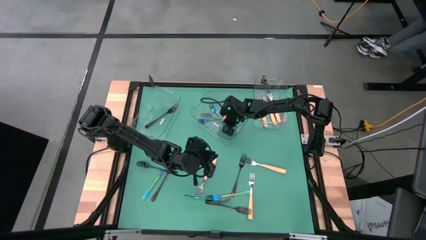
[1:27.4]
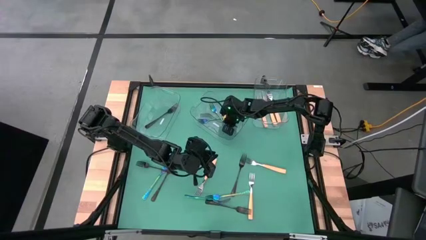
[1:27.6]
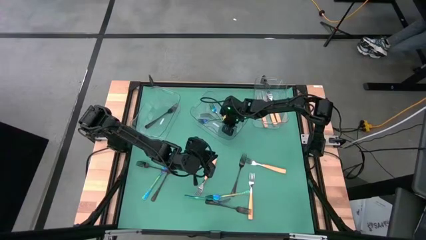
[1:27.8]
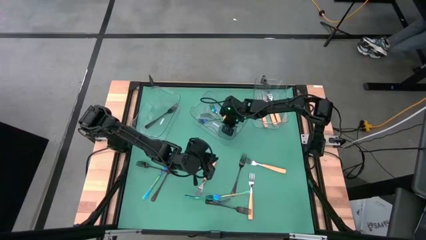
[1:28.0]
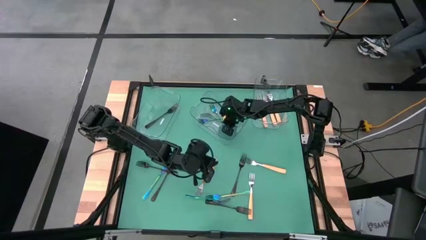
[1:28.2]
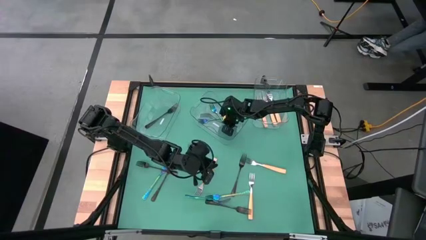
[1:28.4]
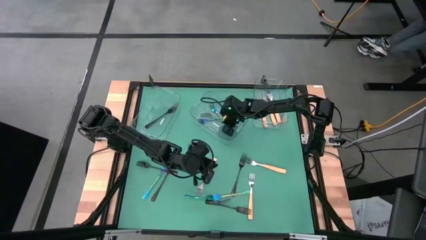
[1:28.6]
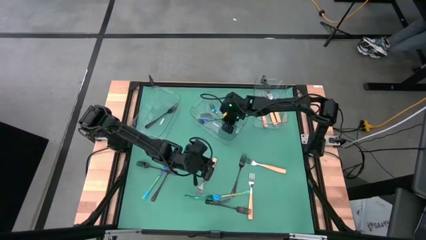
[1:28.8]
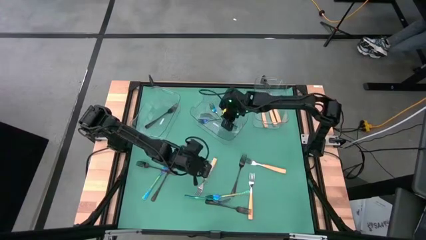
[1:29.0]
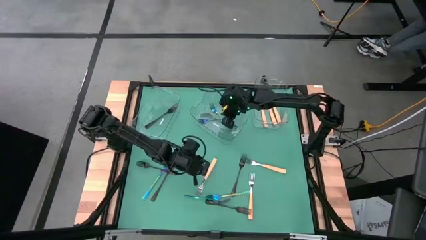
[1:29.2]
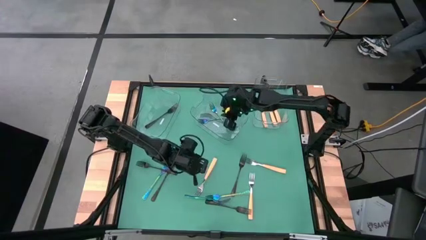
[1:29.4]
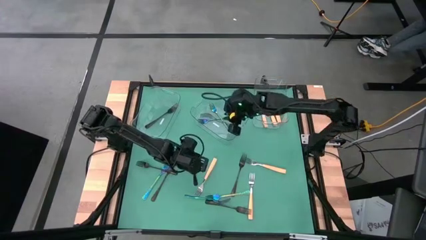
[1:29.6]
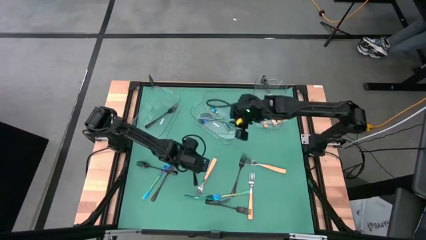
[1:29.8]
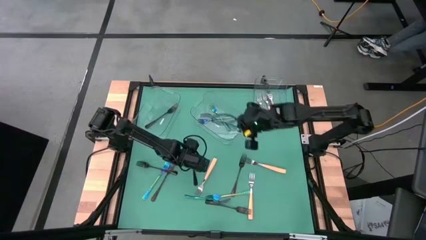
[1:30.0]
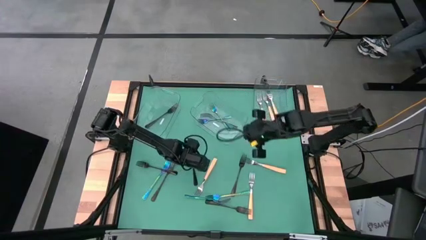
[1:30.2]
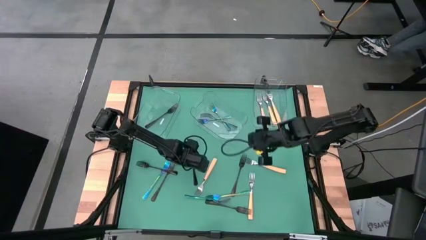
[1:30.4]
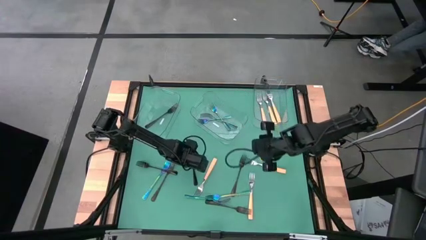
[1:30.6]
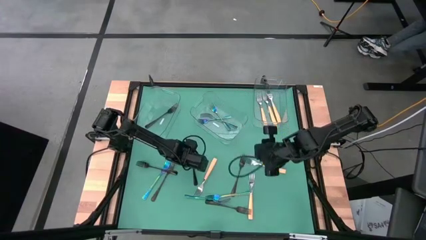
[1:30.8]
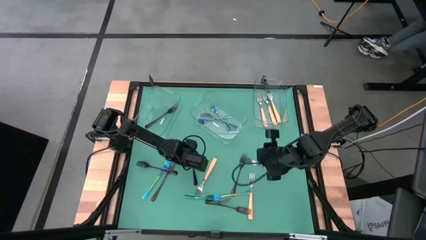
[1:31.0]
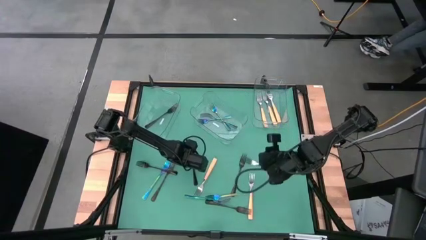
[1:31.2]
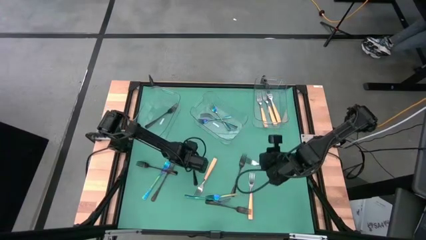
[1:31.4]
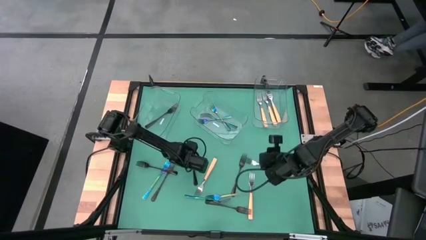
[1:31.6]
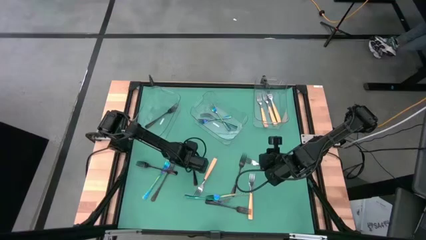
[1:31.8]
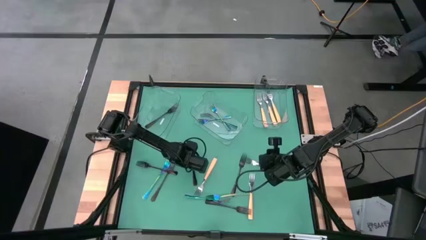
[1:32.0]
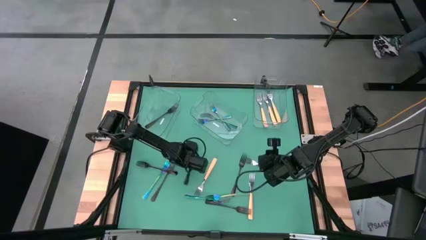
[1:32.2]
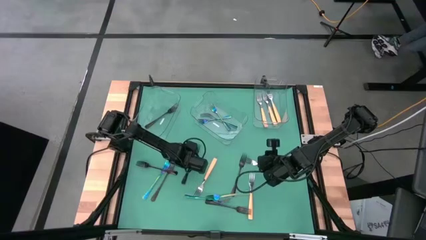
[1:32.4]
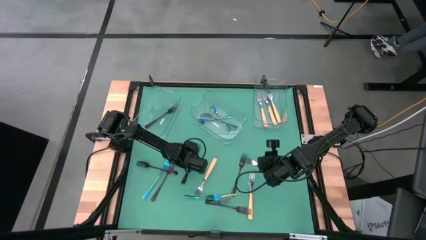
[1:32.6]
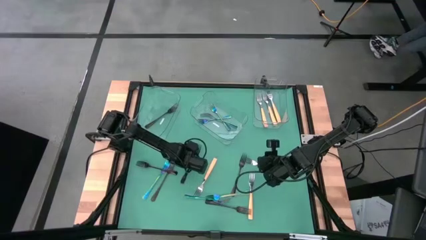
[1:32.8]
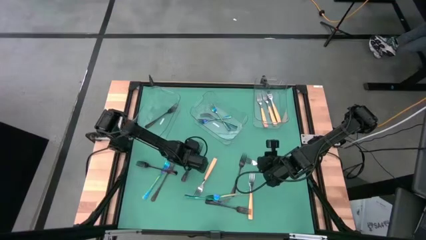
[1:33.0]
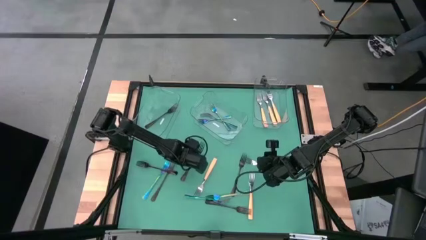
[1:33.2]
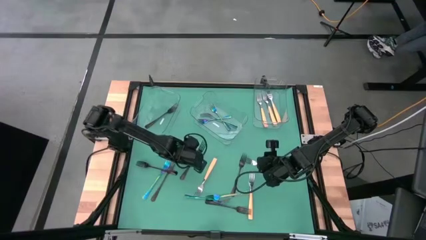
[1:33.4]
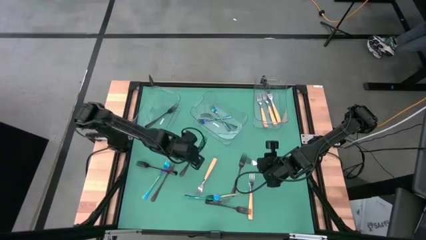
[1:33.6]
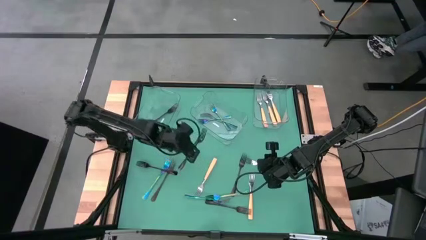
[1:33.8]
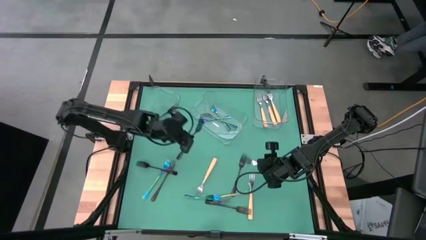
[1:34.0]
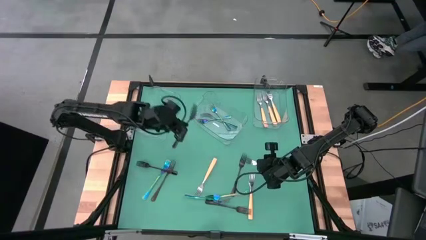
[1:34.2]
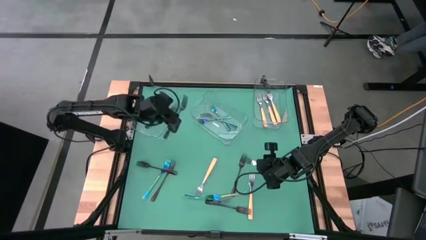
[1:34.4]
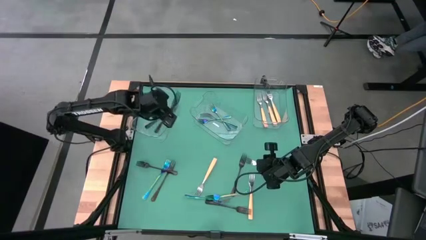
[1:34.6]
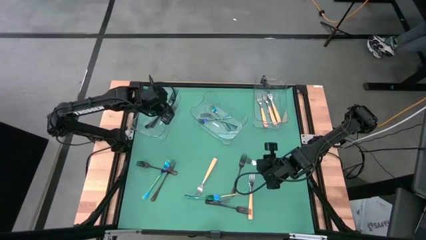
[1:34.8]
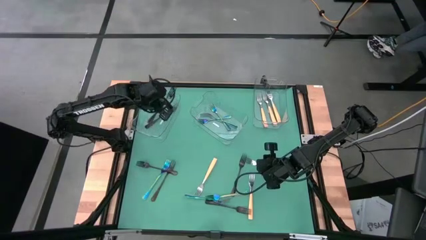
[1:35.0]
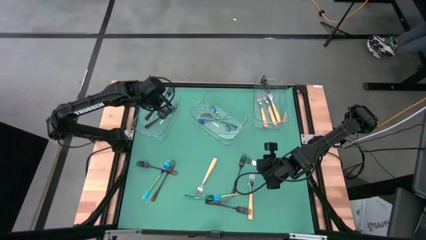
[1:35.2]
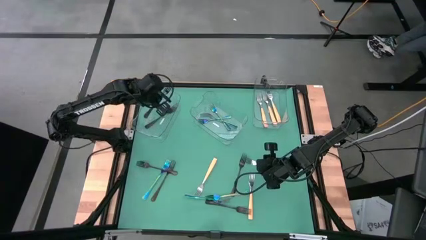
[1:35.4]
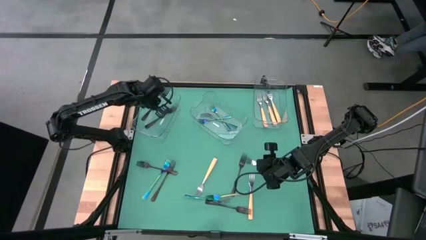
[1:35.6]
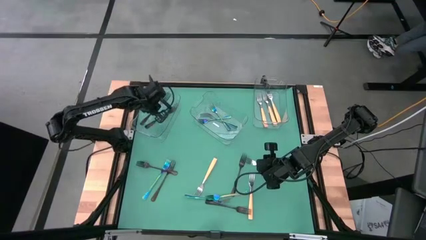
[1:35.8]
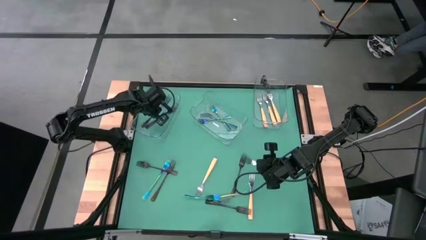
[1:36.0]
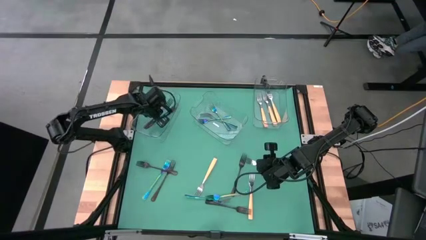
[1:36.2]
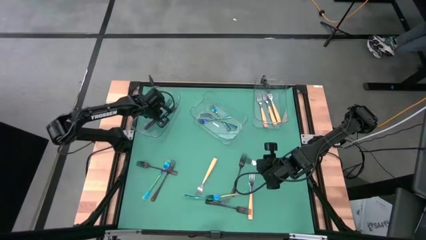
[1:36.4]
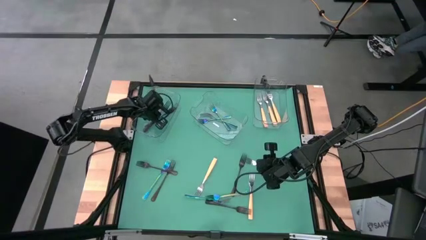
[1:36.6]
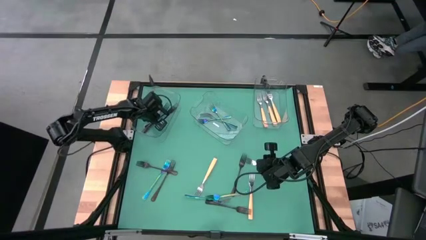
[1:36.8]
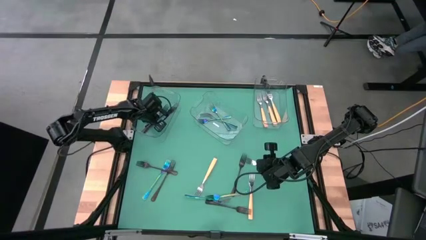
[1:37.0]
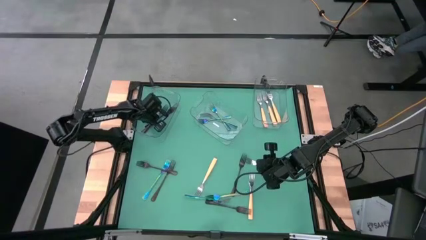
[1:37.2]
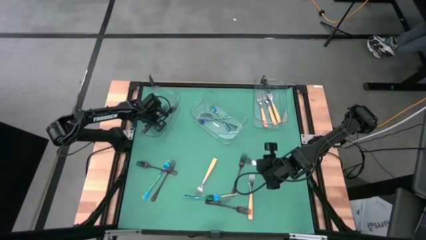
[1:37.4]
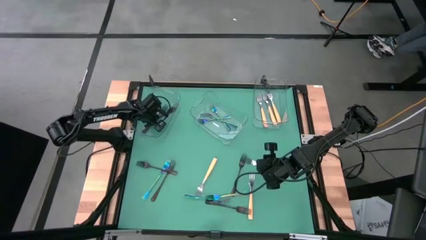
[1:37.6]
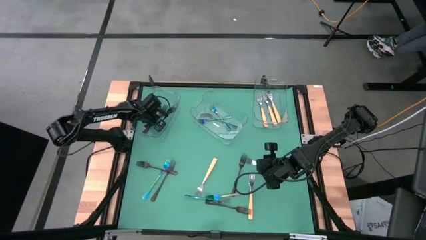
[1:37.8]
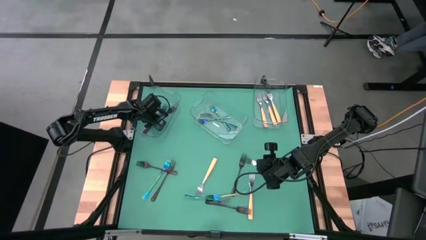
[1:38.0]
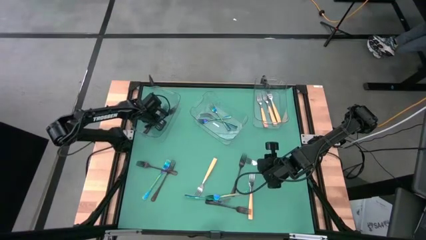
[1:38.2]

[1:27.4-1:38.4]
Task: Sort silverware by color (type)
Put the black fork into the left transparent bin

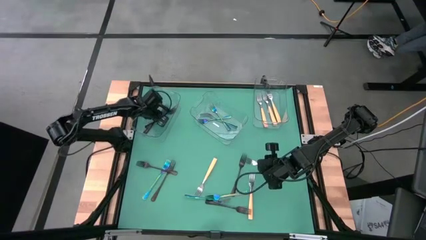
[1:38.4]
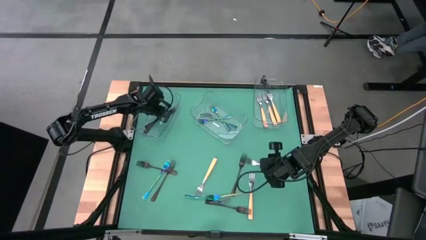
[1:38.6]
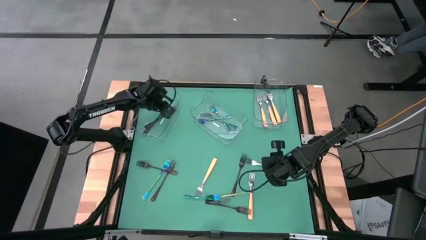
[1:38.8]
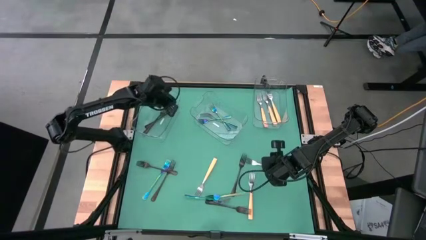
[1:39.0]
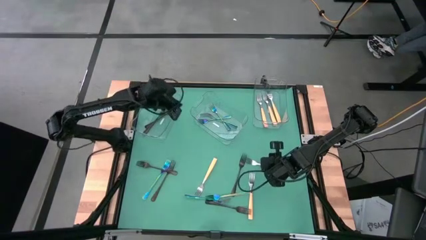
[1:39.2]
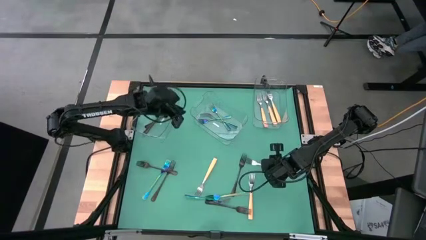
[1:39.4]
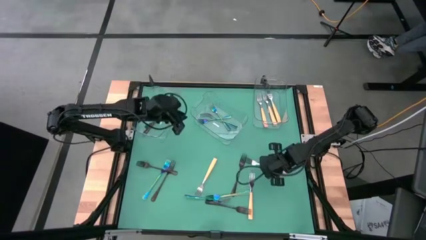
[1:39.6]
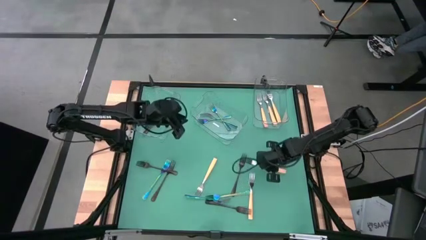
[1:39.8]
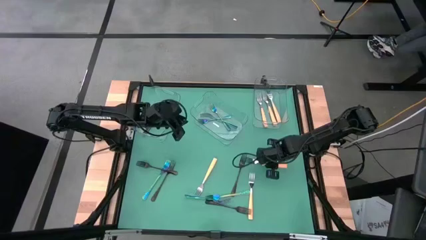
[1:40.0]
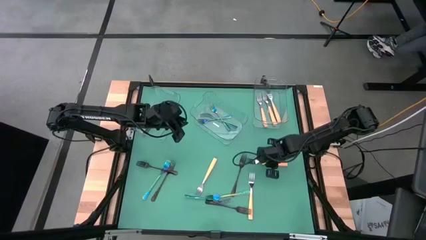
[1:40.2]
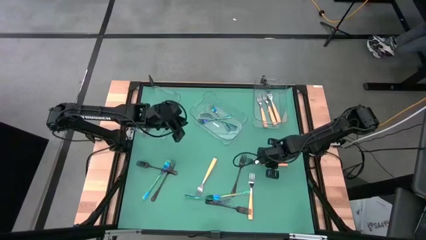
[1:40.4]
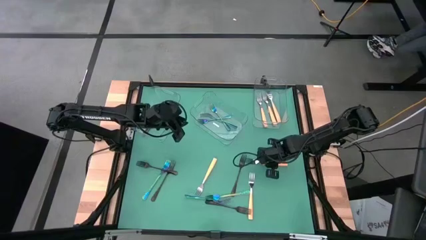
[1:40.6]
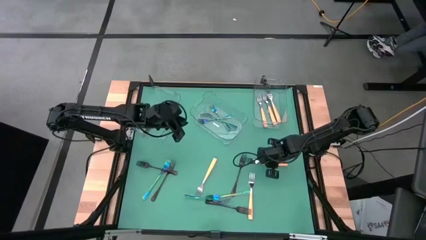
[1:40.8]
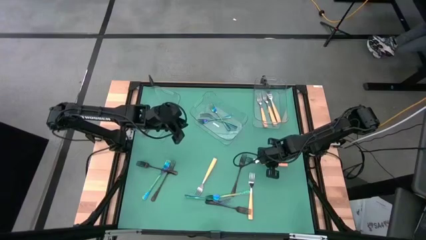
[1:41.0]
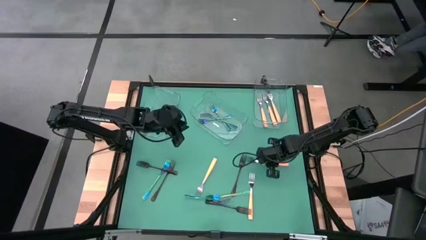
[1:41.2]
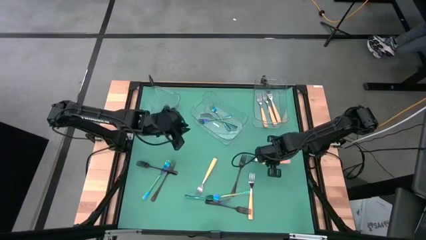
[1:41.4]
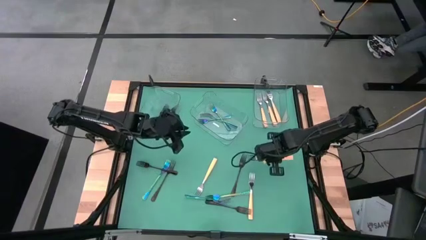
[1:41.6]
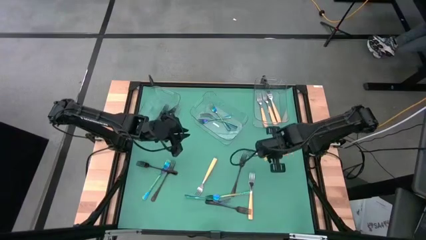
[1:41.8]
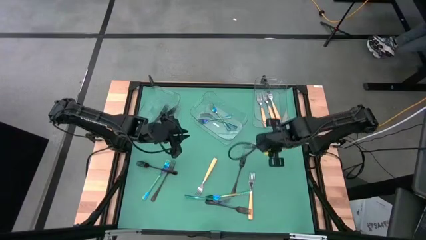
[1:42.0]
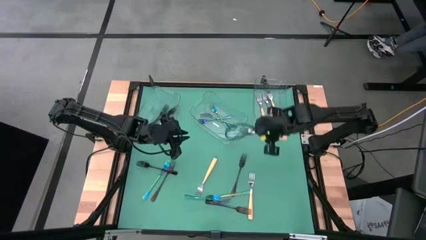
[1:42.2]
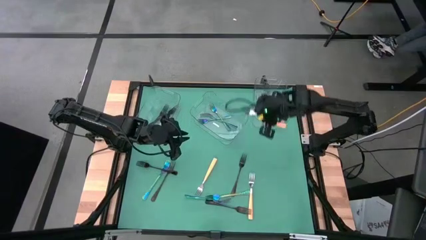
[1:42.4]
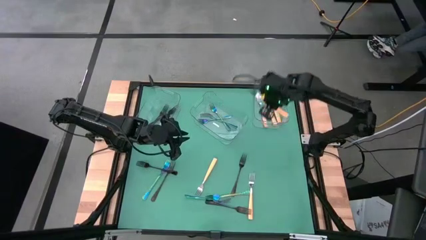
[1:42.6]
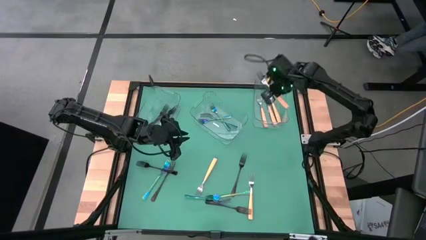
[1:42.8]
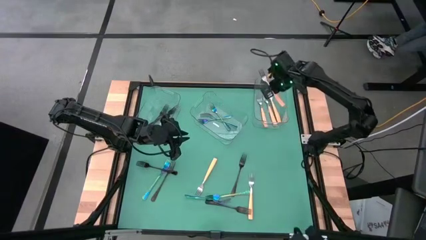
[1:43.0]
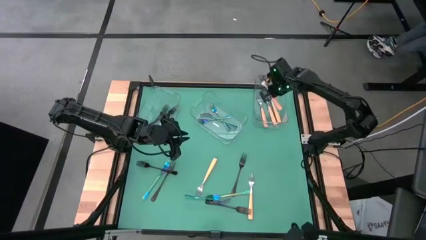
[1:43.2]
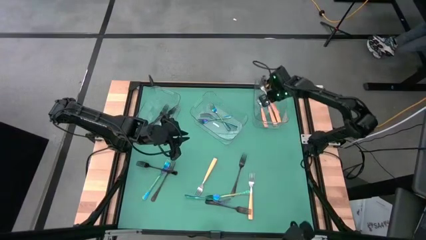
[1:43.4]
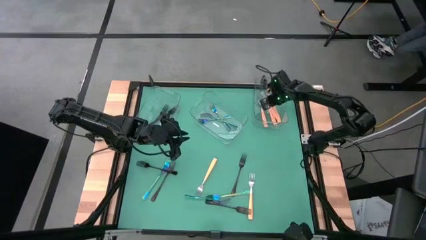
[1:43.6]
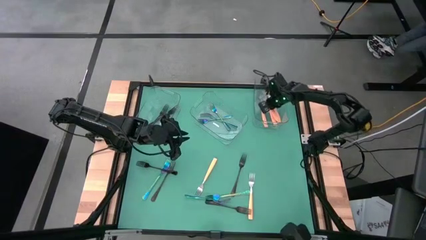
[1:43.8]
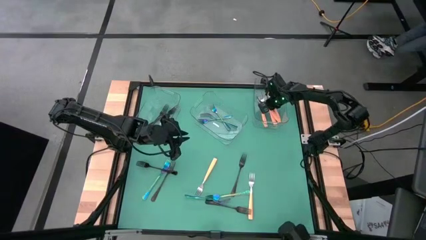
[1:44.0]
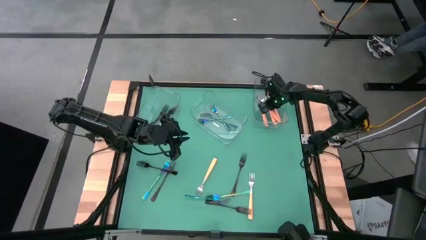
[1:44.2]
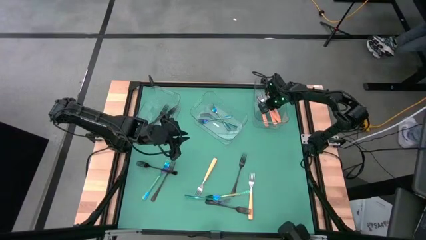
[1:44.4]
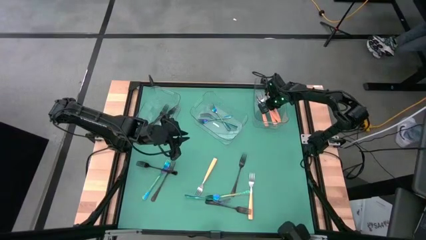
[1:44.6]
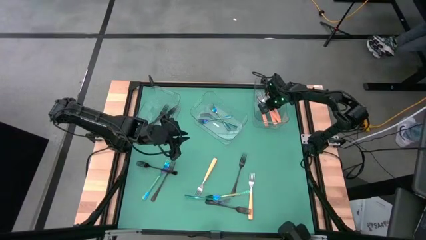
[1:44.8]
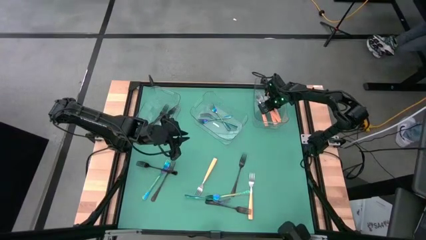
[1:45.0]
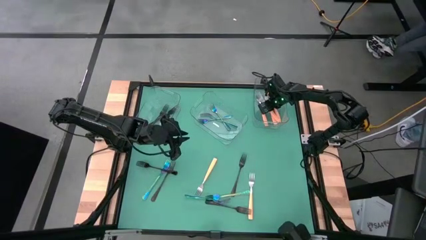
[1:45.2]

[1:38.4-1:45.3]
Put the orange fork into the right transparent bin
